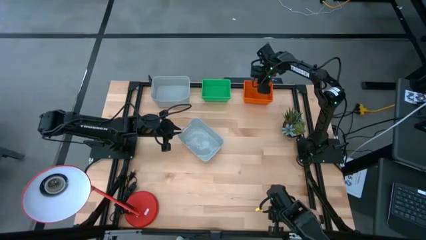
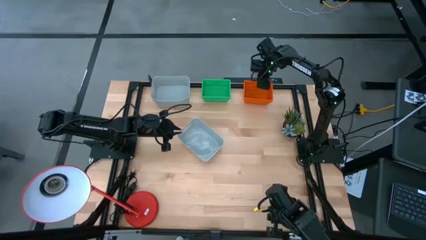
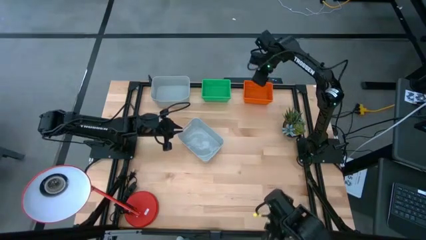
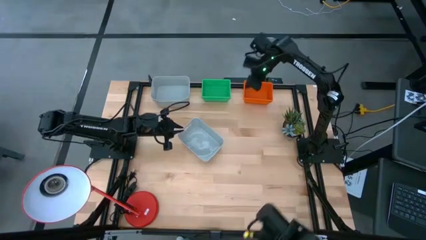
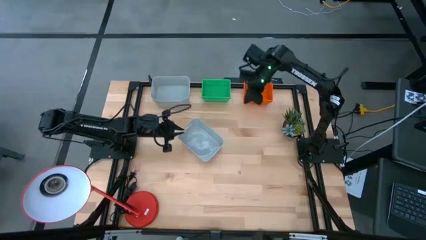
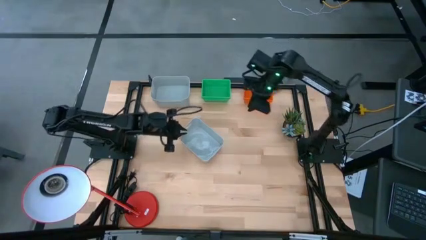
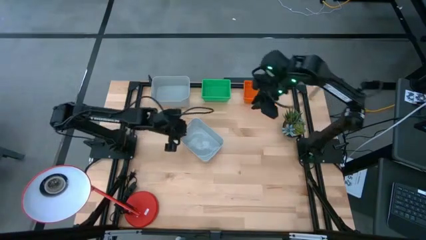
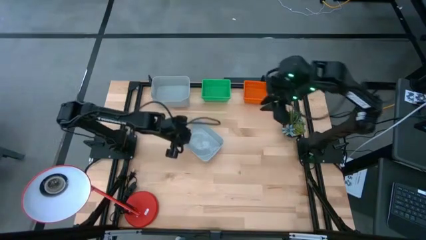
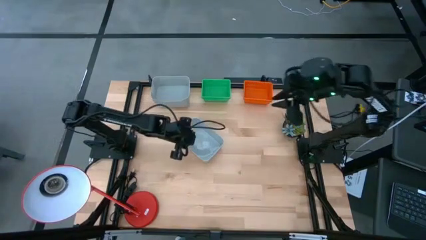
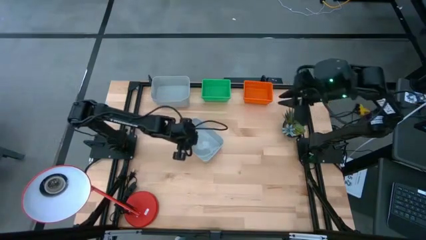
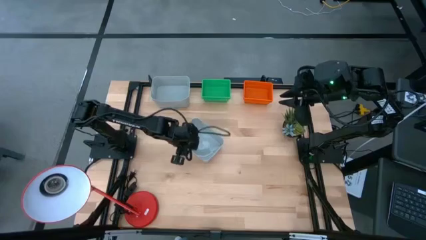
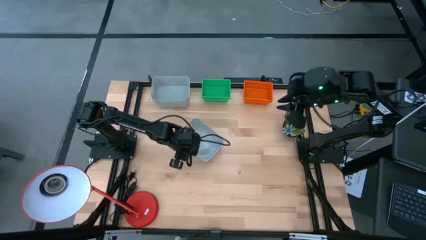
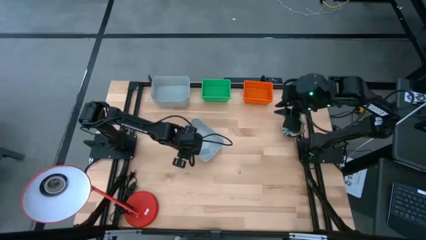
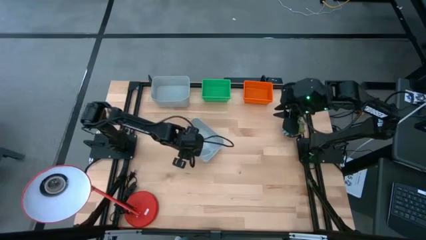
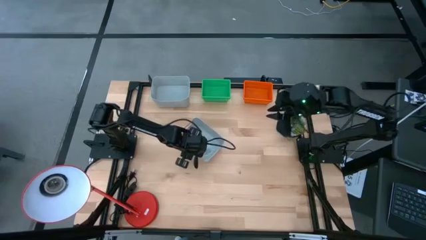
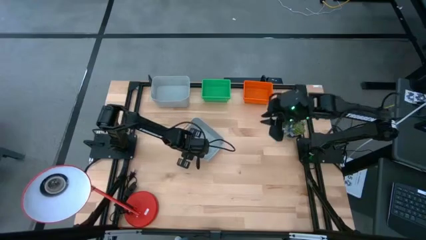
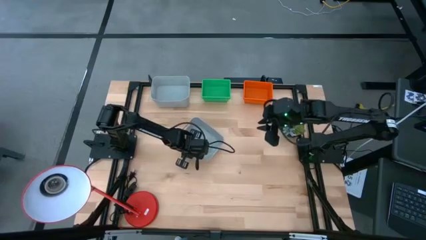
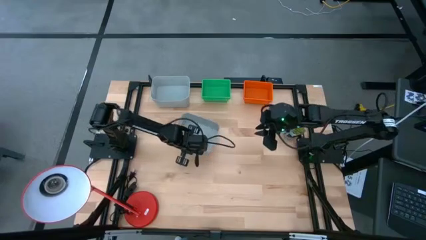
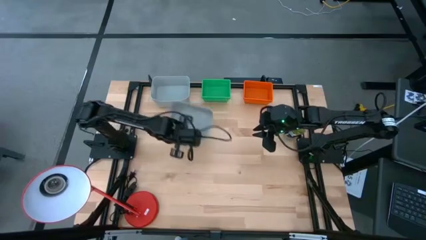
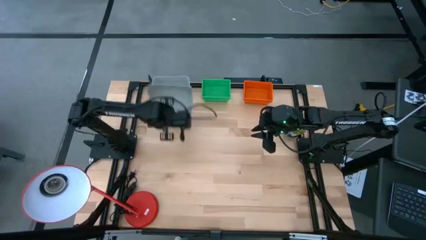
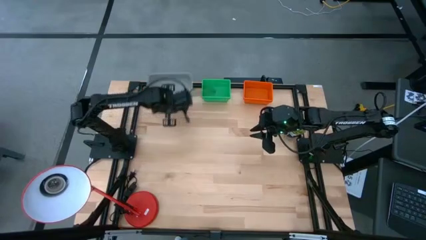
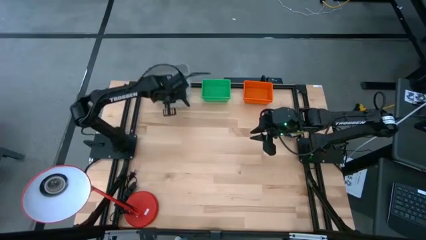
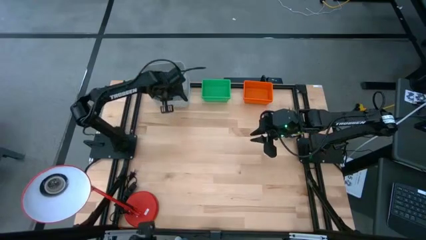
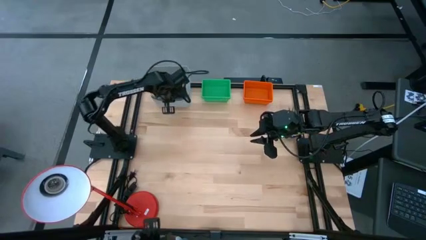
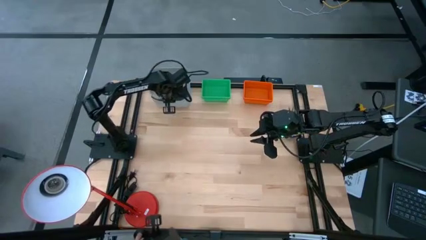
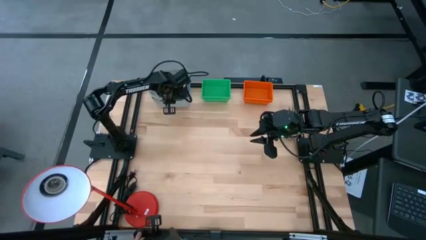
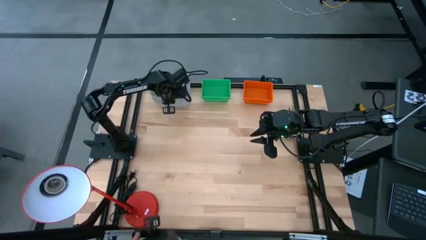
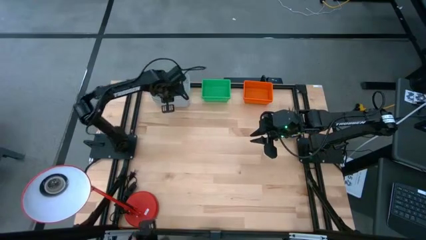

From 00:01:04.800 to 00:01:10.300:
Stack the bottom gray bin on top of the top gray bins

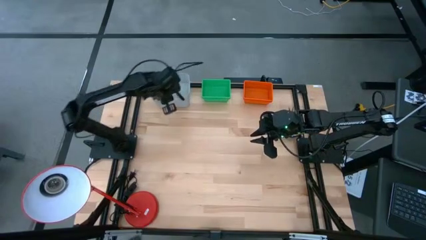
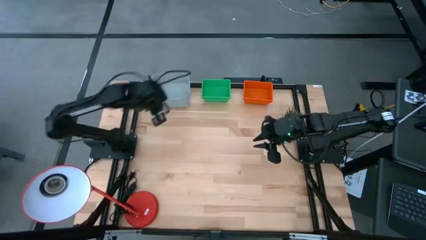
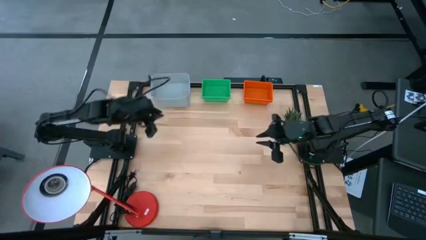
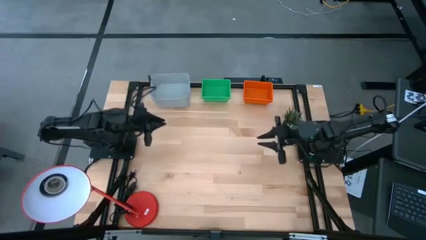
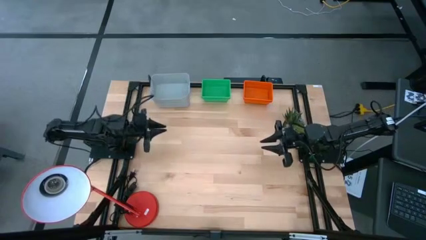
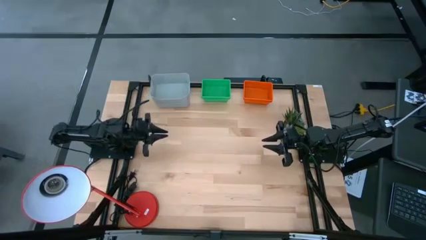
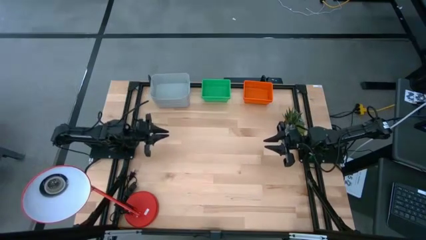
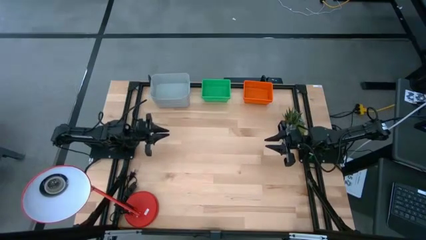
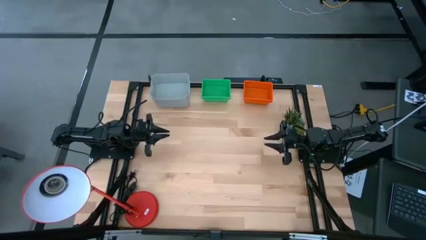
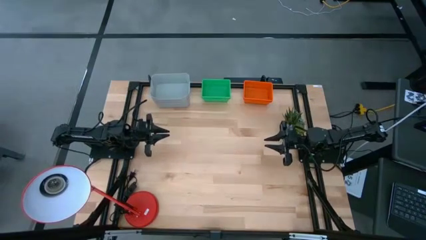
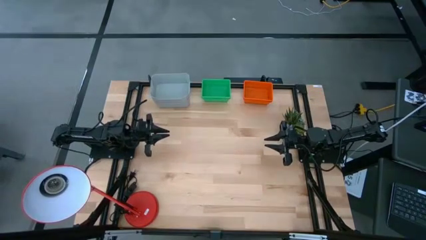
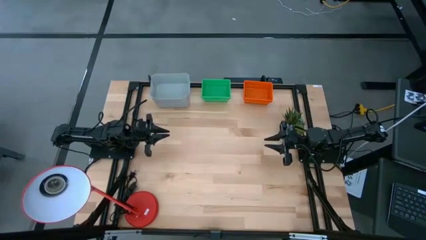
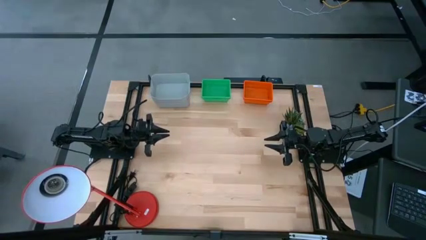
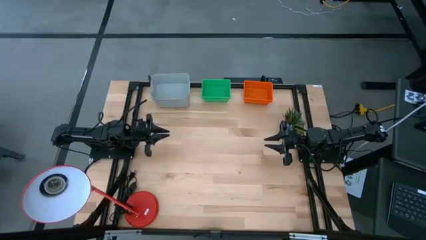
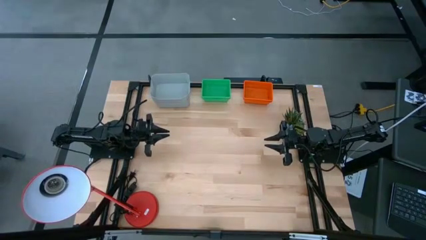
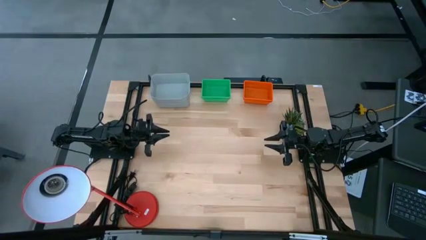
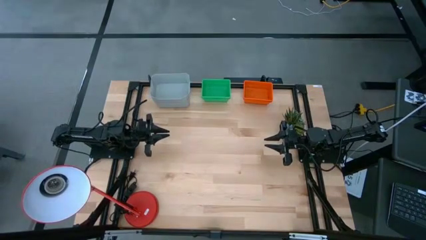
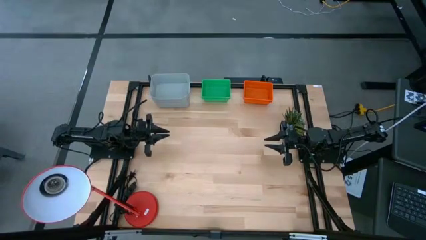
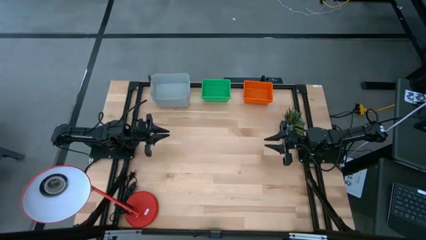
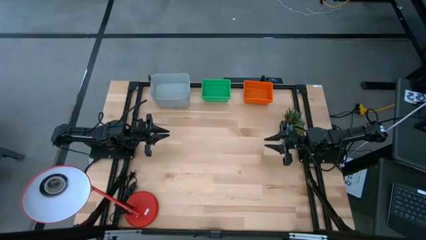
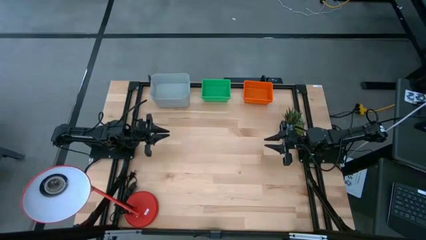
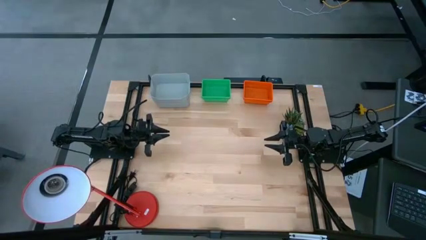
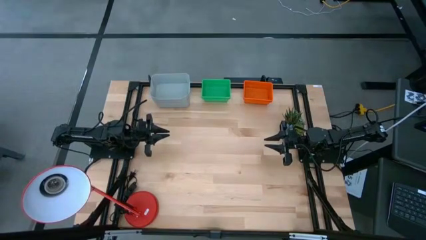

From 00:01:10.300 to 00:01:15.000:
Return to Home Position

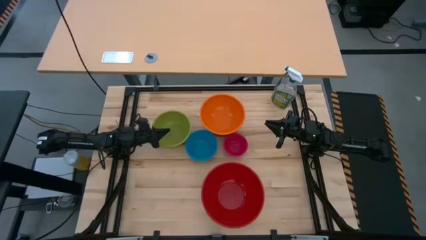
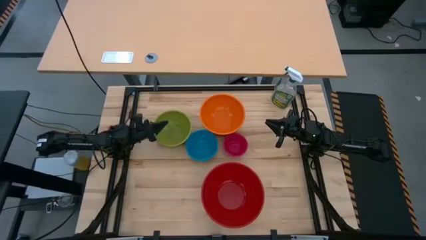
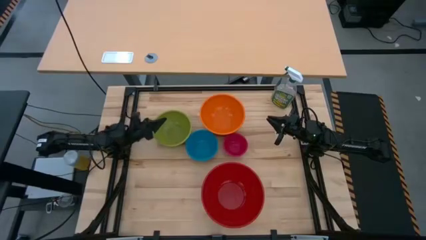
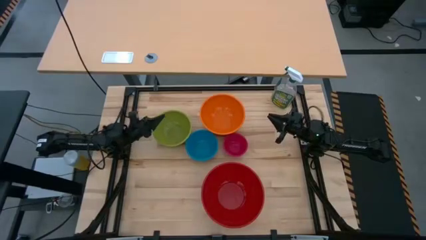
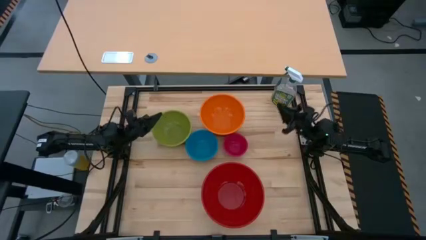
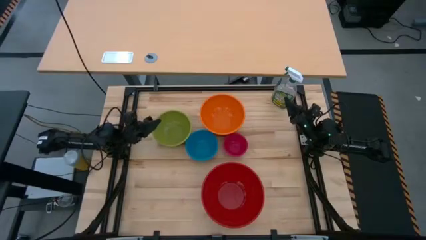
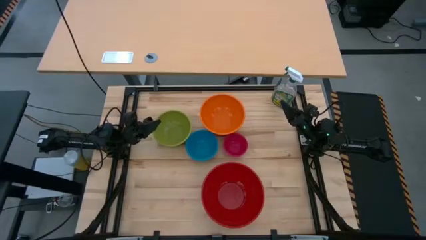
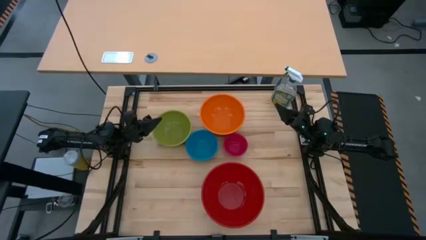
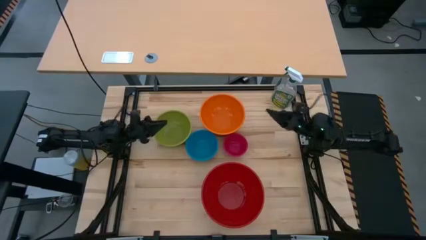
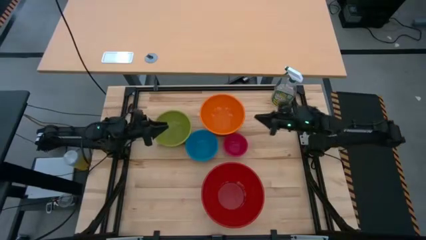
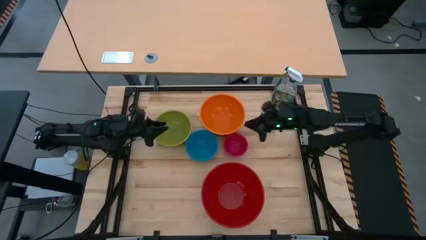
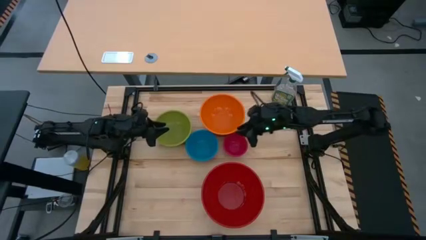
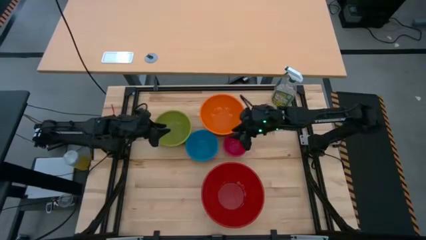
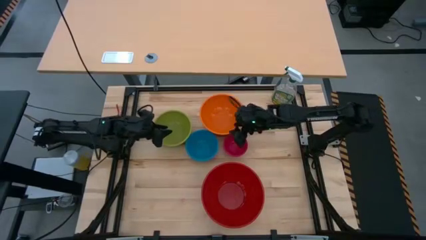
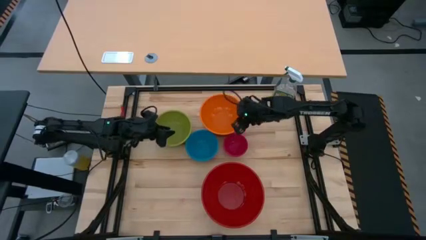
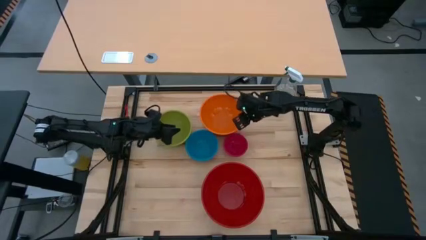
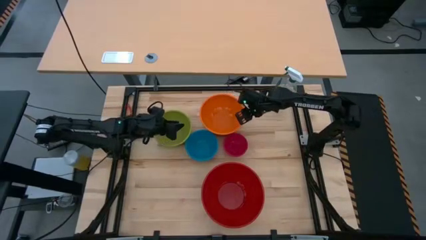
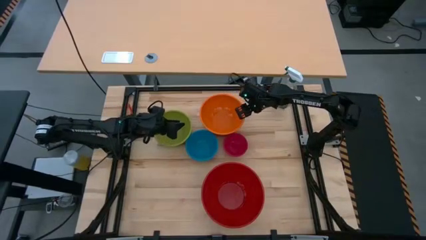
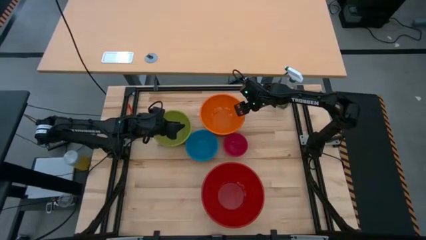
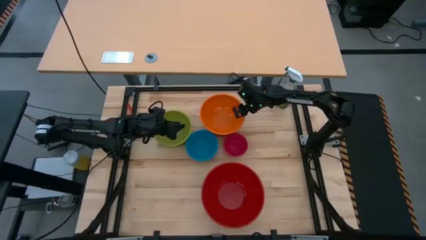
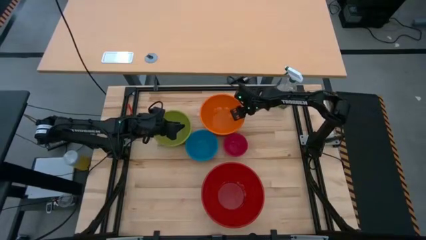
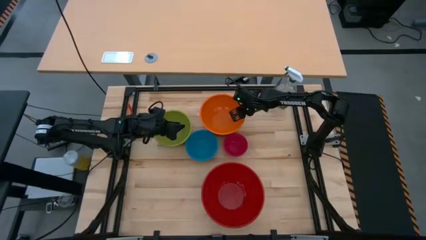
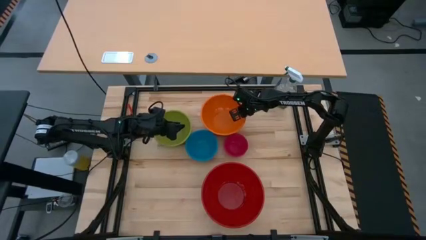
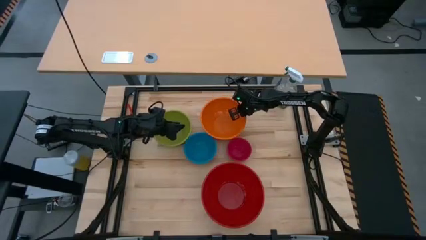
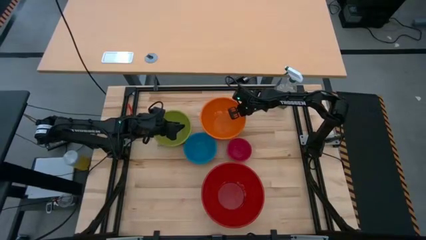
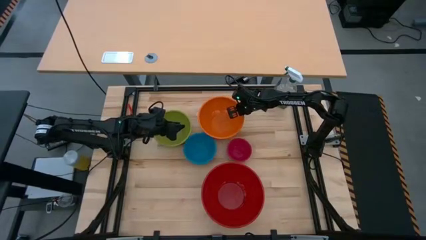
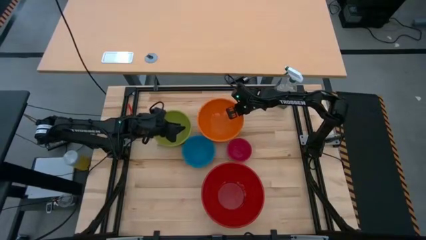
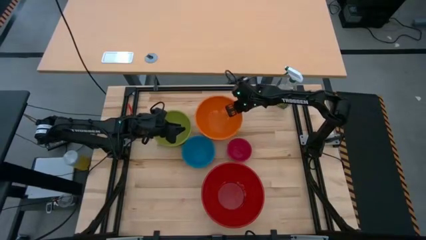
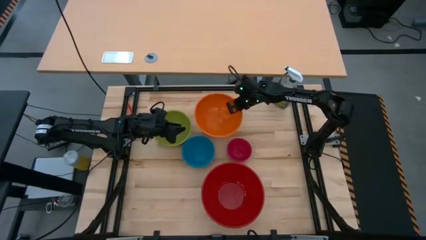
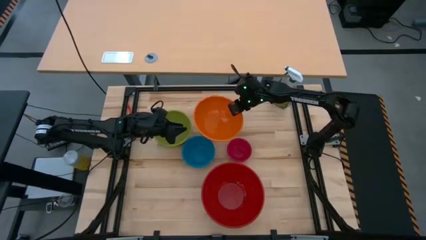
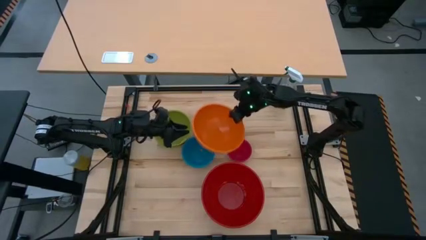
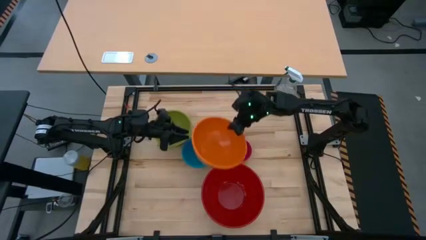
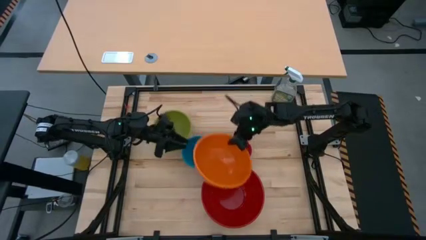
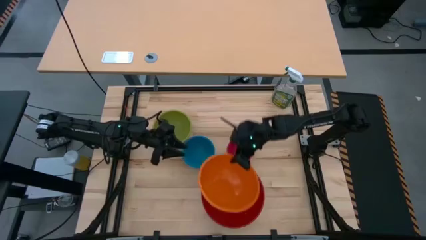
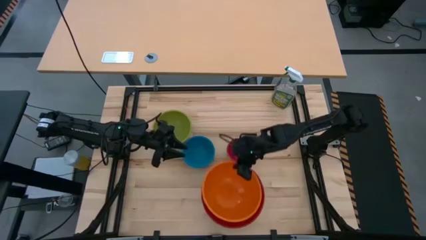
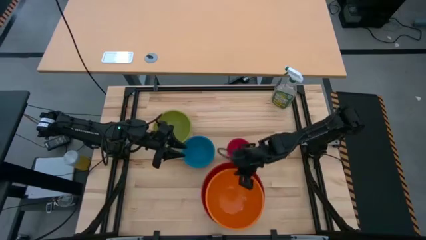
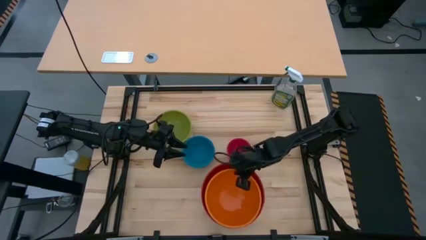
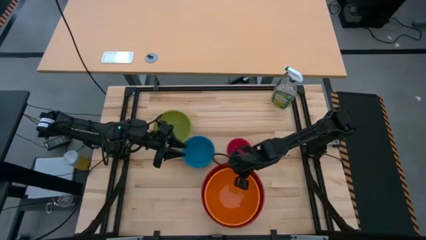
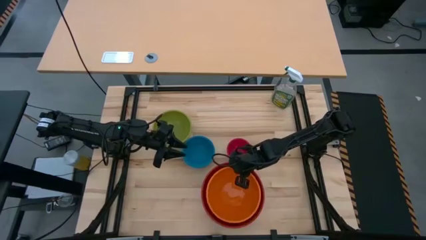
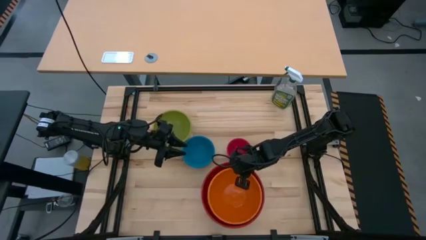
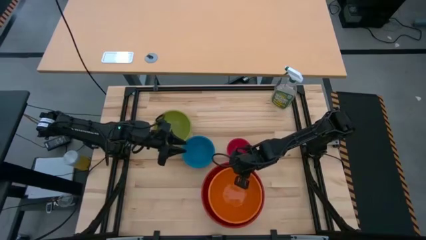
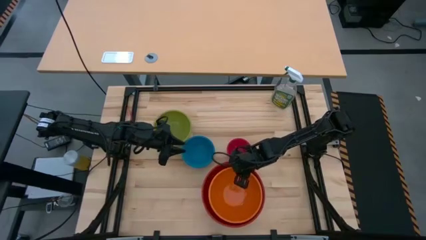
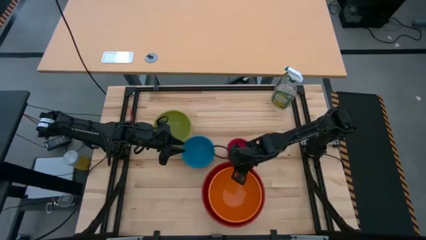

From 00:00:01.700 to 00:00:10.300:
Stack the orange bowl on top of the large red bowl
